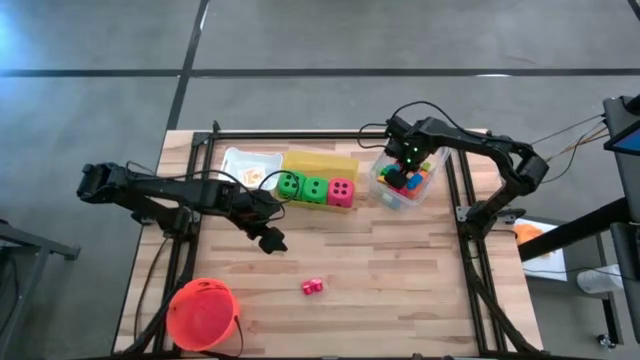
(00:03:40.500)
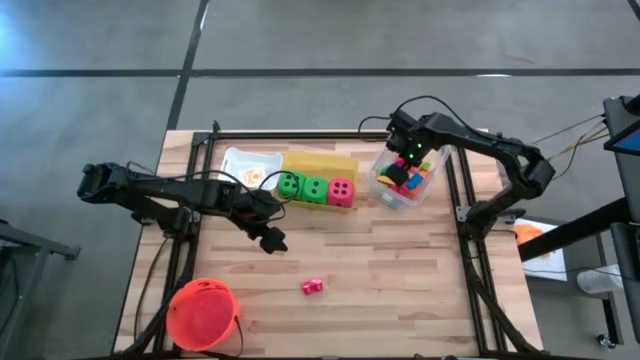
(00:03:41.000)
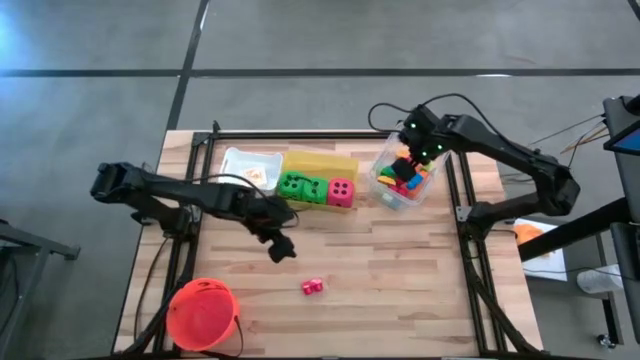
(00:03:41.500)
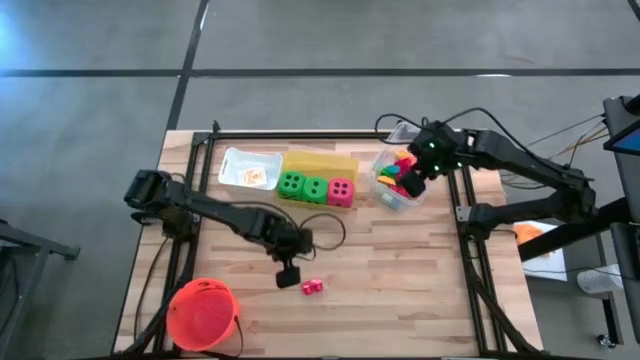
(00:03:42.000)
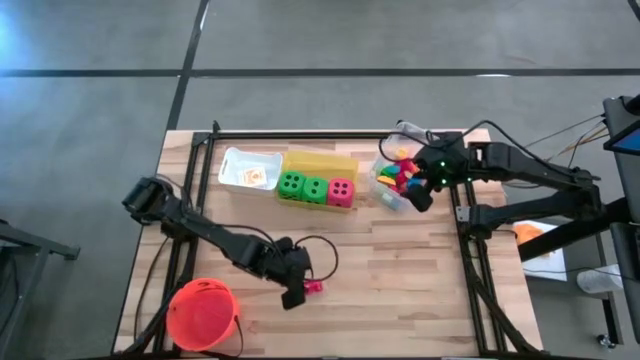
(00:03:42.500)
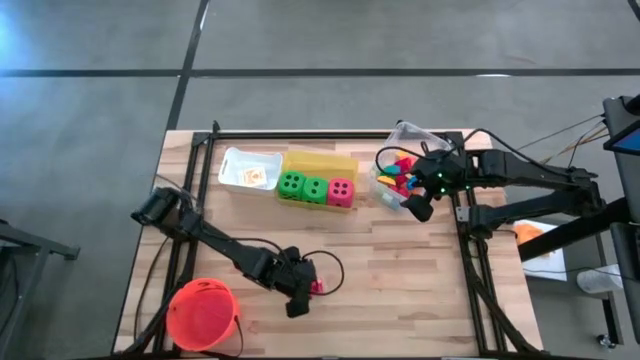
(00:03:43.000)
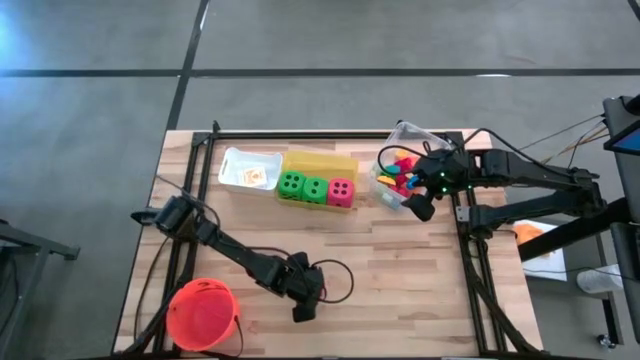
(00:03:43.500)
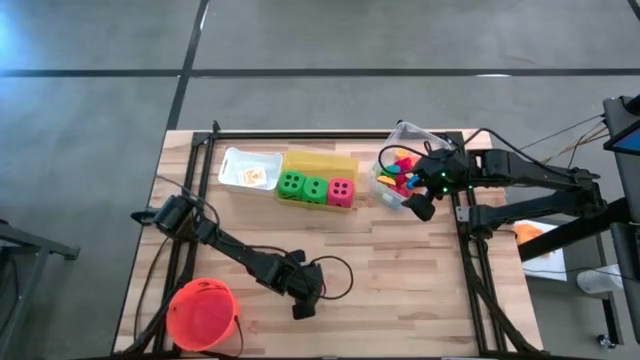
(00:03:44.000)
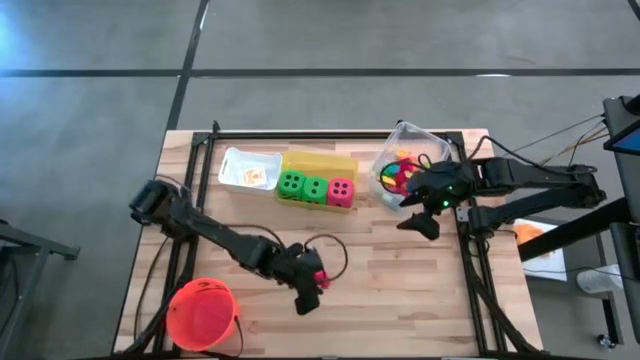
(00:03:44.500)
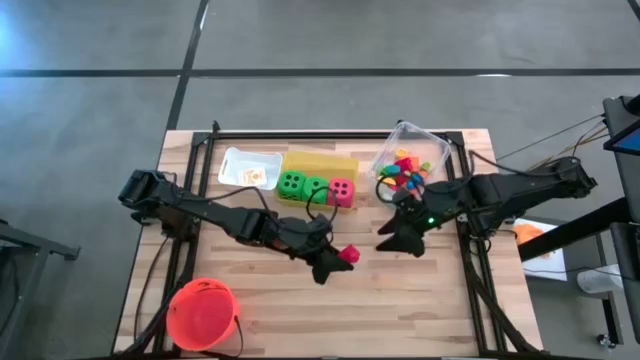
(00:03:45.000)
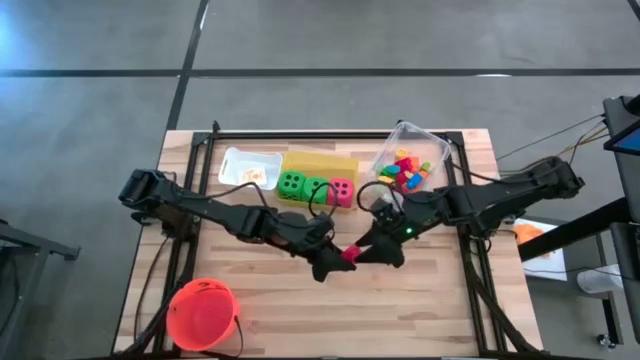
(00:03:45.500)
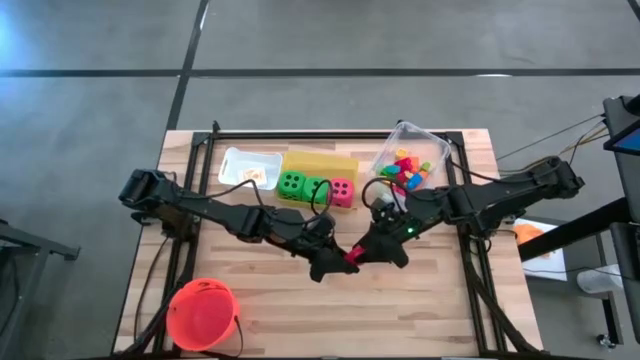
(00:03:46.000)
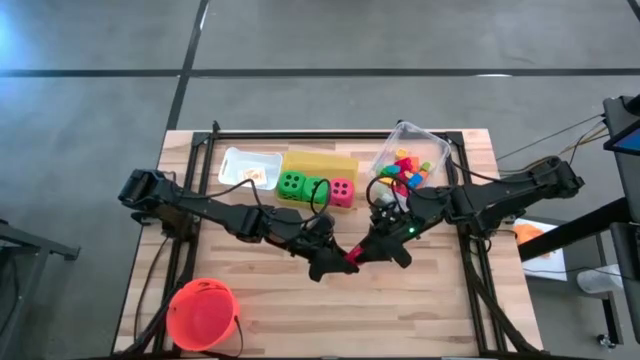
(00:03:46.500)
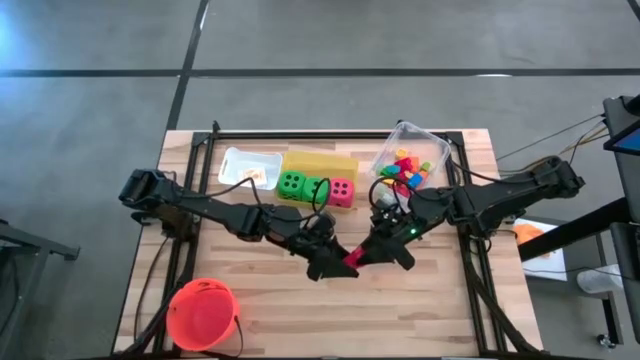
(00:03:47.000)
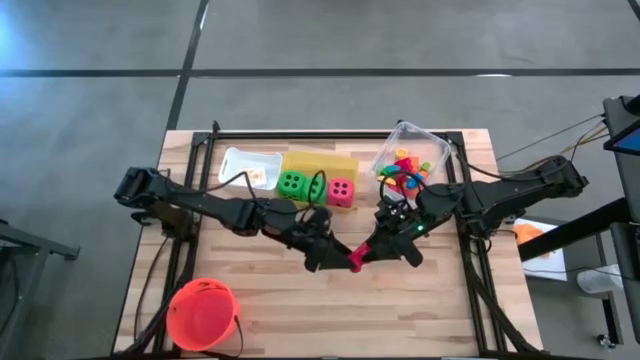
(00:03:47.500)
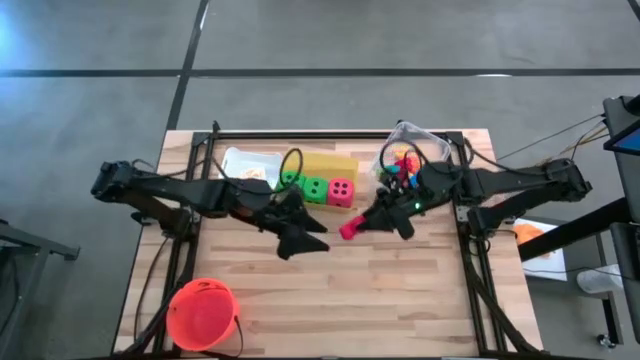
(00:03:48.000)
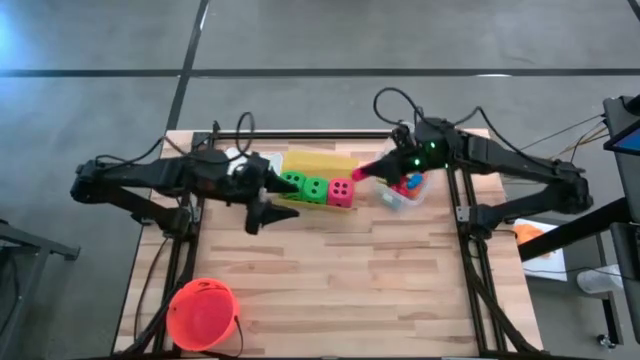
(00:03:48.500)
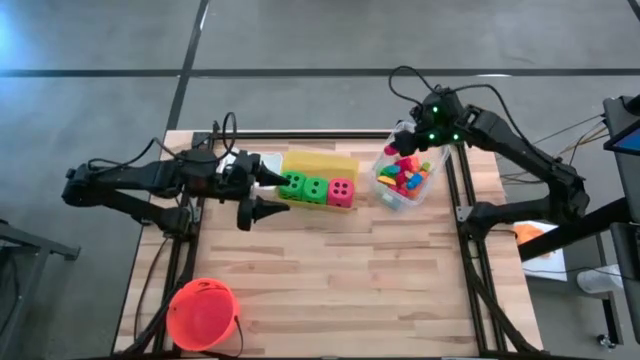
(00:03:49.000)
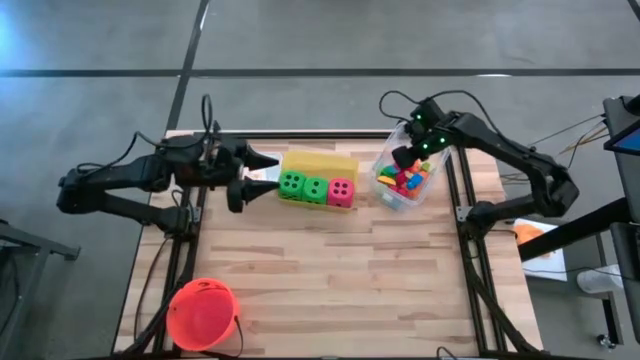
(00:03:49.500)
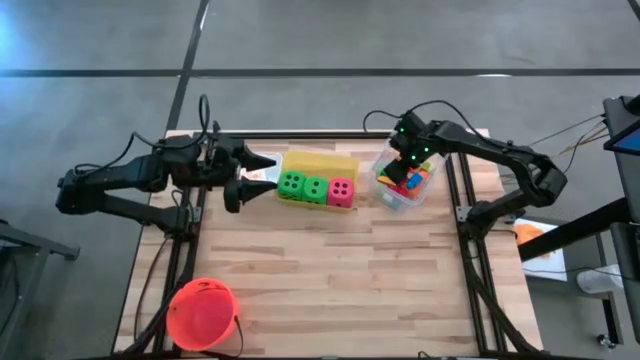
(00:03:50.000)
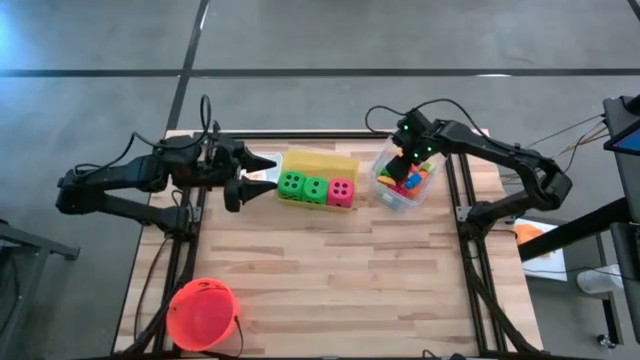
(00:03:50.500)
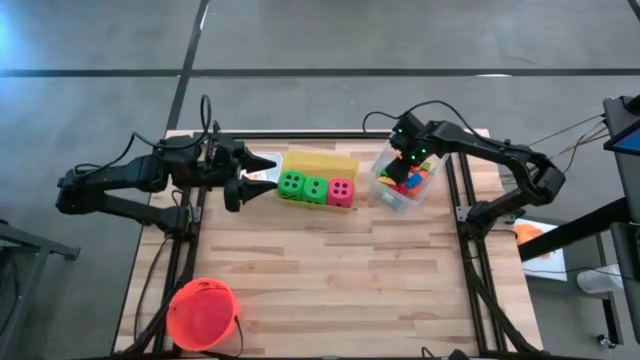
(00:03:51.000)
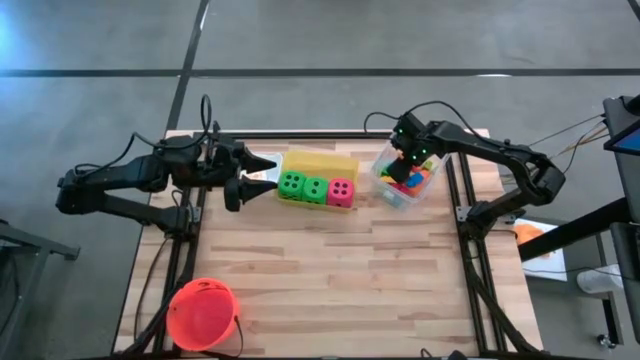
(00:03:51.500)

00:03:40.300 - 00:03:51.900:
Task: Pick & Place Toys
Put the red game piece into the transparent bin

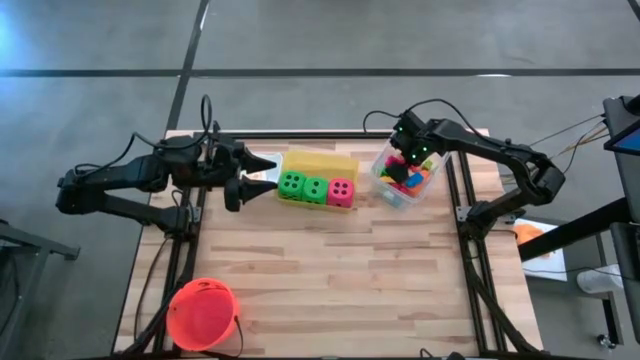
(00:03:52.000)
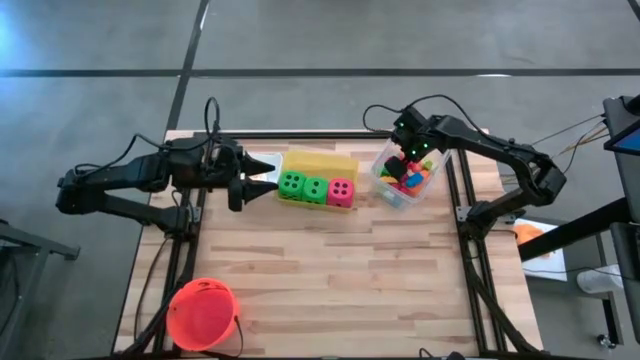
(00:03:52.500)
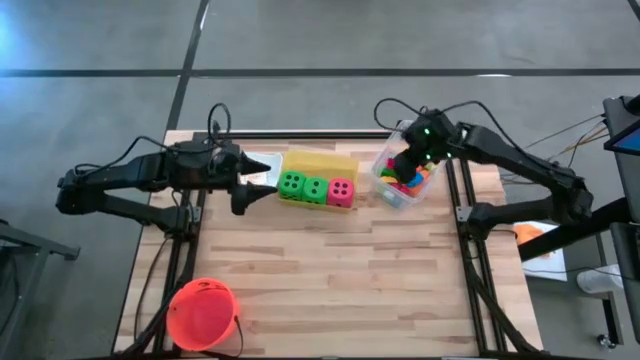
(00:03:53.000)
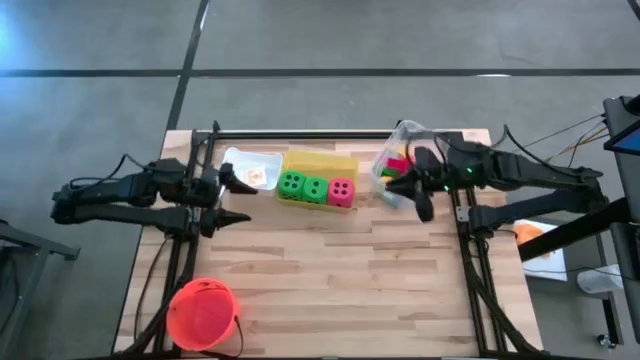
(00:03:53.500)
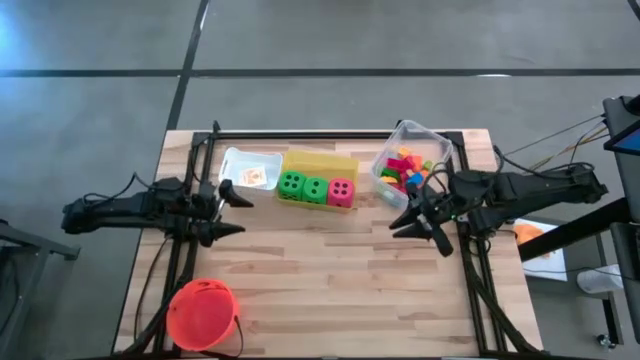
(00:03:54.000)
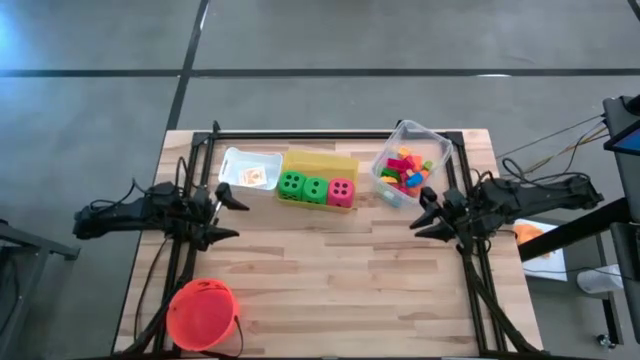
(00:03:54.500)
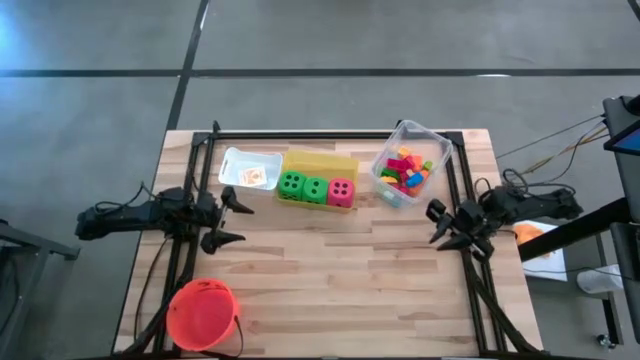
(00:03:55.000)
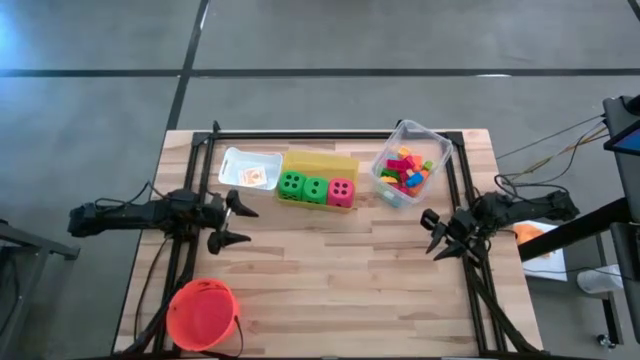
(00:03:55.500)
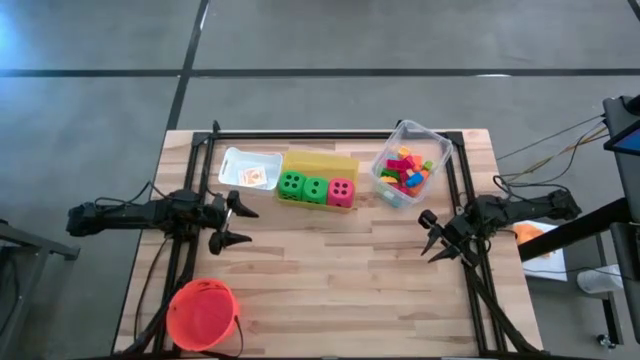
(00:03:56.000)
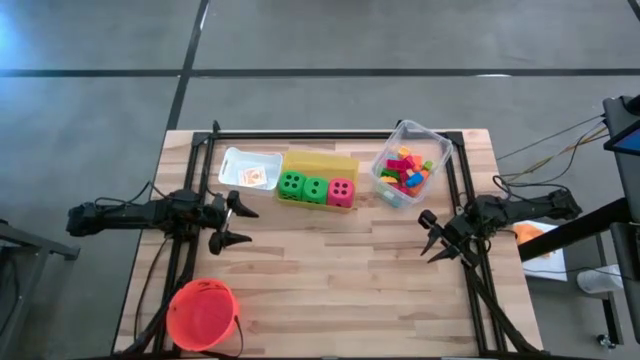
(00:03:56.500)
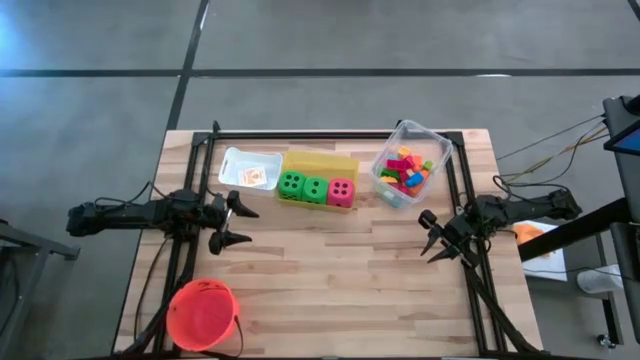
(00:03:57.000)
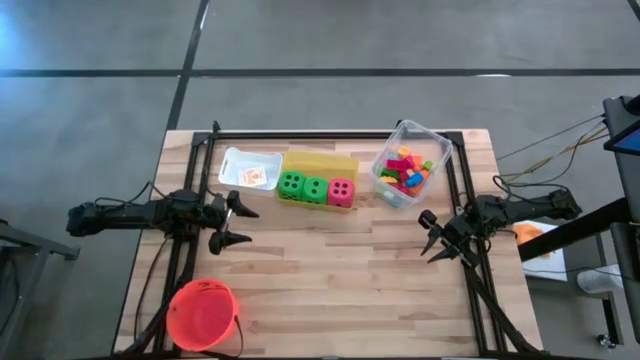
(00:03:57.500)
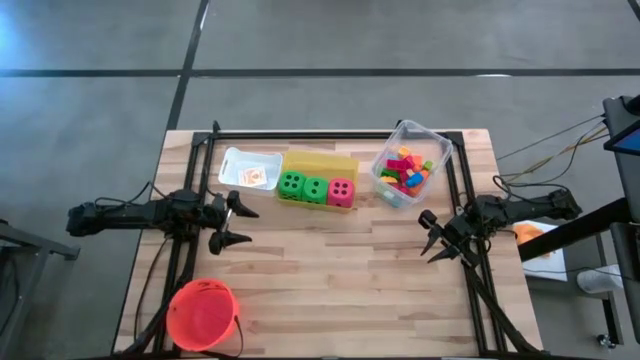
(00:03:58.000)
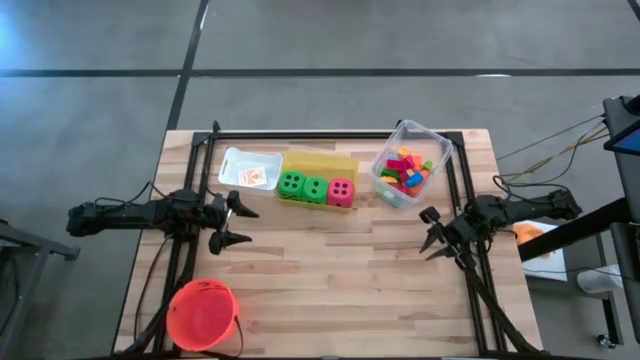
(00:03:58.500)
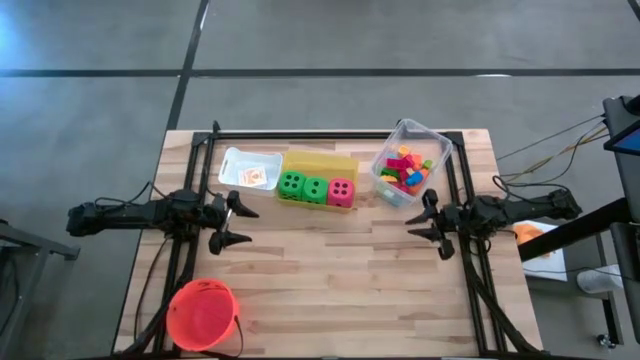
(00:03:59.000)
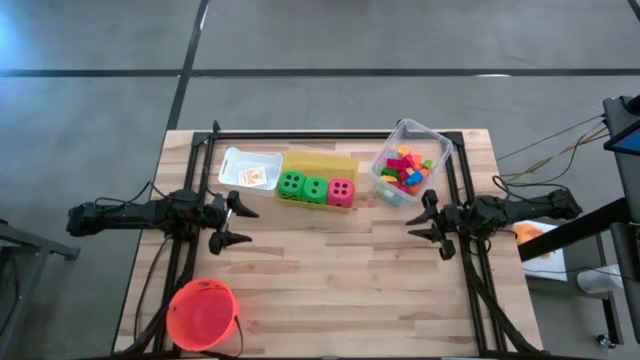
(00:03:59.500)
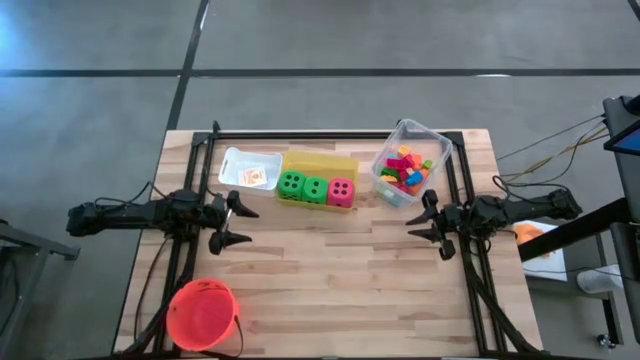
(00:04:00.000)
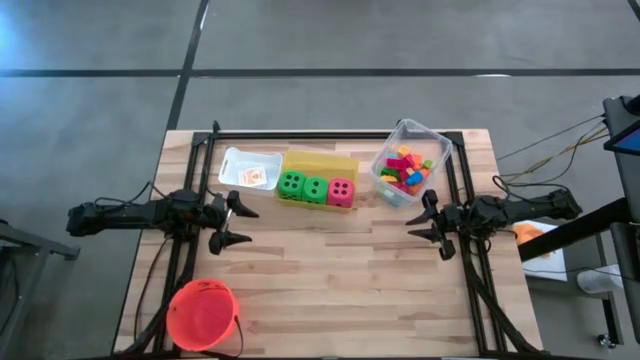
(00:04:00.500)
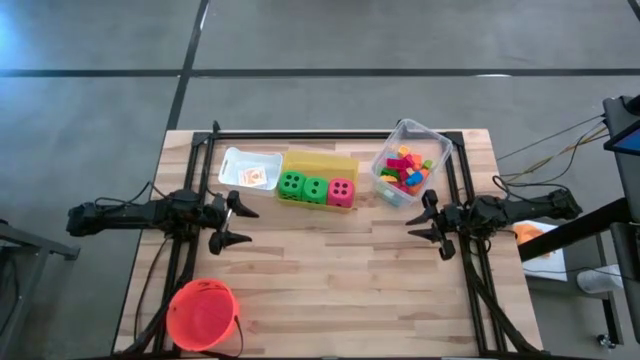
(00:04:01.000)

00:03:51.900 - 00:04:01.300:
Return to Home Position
